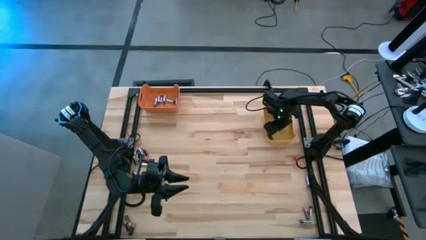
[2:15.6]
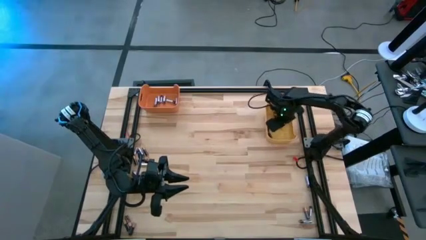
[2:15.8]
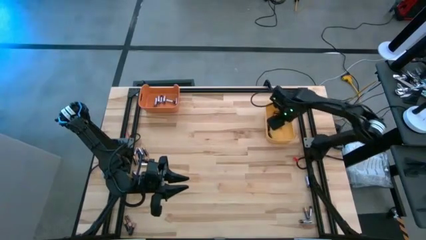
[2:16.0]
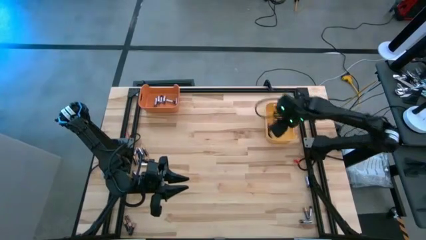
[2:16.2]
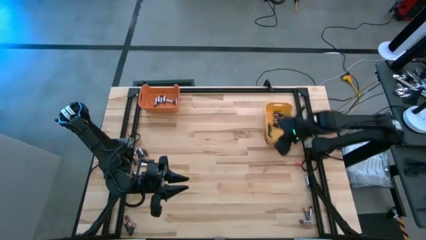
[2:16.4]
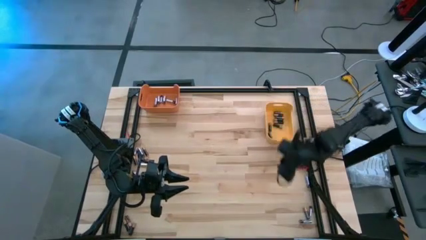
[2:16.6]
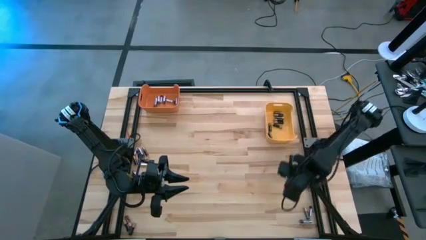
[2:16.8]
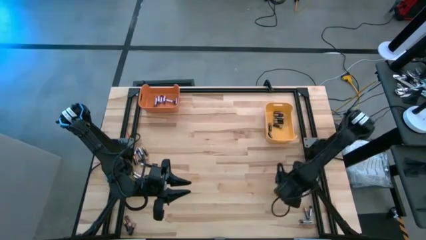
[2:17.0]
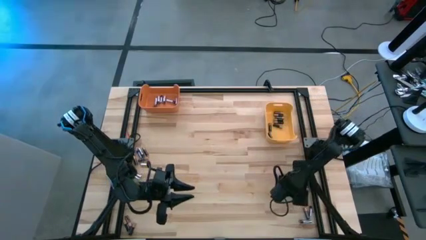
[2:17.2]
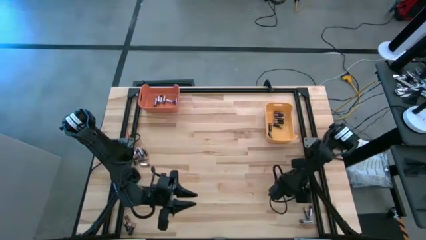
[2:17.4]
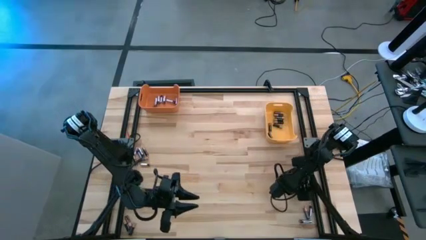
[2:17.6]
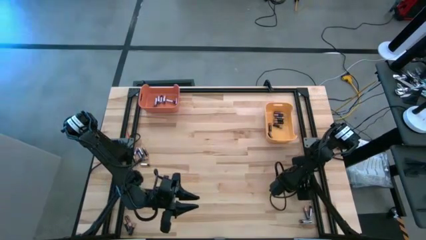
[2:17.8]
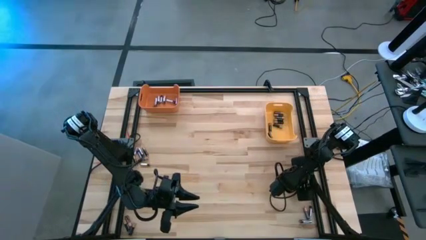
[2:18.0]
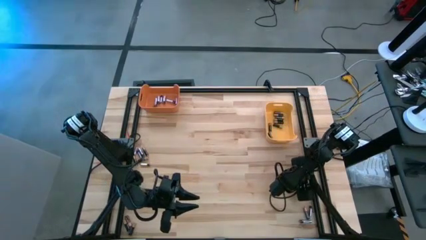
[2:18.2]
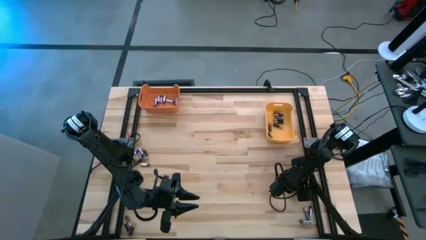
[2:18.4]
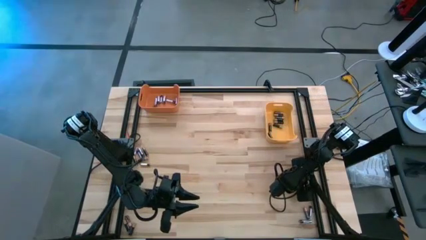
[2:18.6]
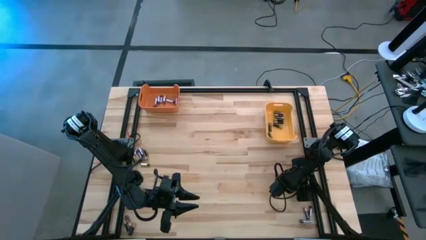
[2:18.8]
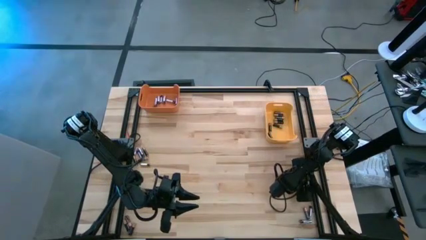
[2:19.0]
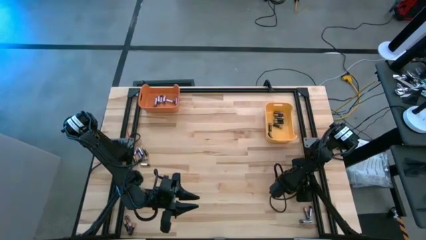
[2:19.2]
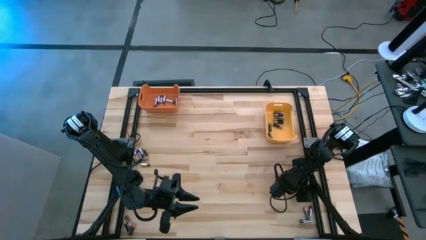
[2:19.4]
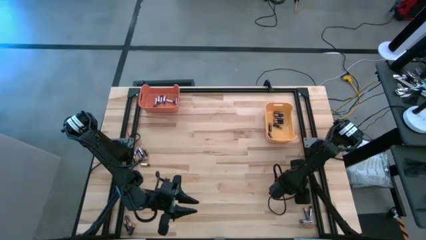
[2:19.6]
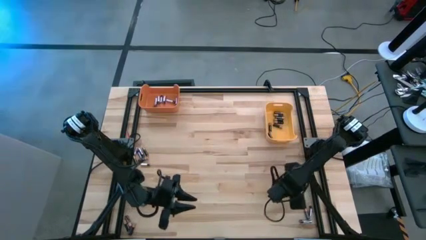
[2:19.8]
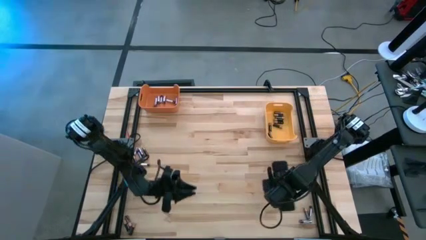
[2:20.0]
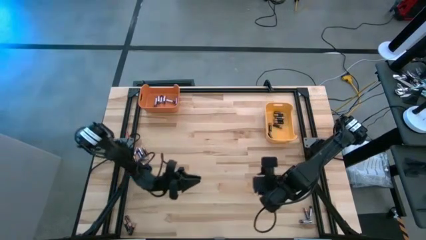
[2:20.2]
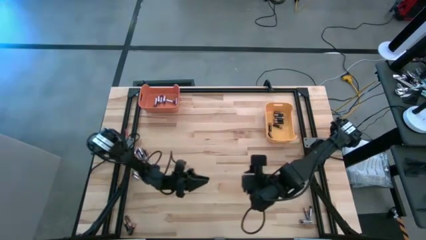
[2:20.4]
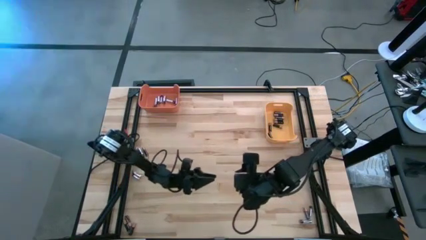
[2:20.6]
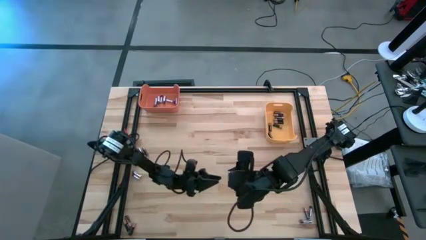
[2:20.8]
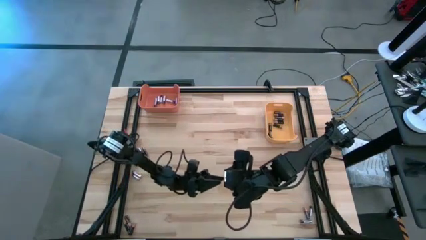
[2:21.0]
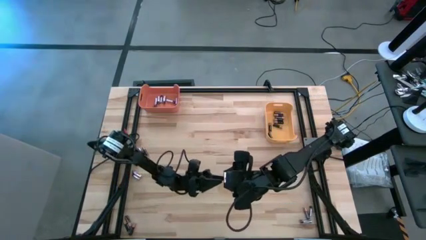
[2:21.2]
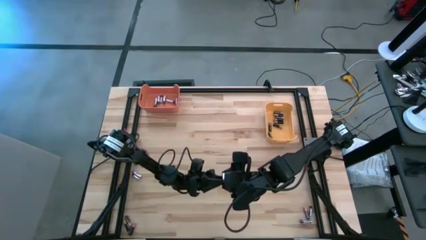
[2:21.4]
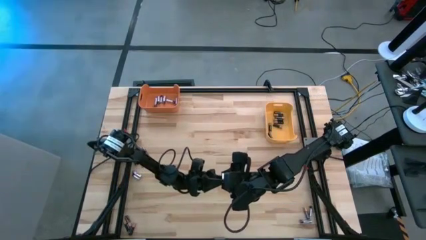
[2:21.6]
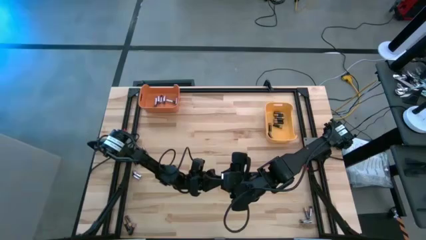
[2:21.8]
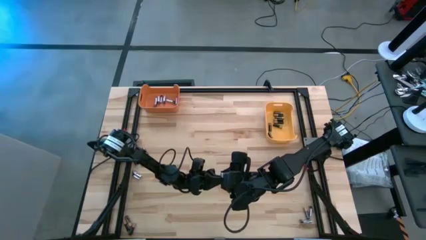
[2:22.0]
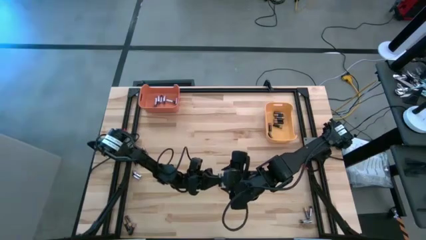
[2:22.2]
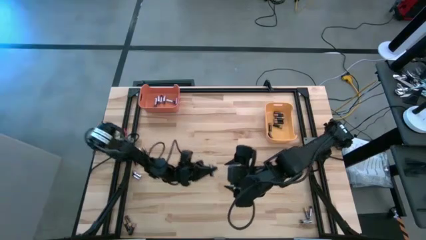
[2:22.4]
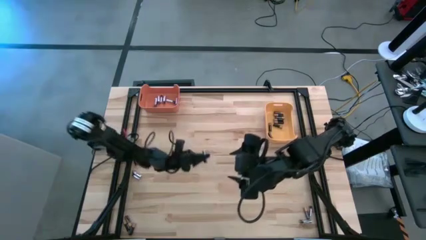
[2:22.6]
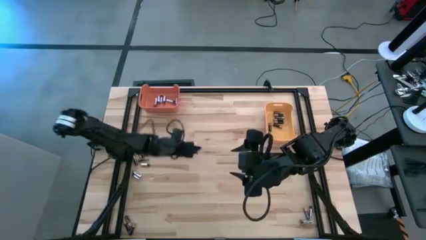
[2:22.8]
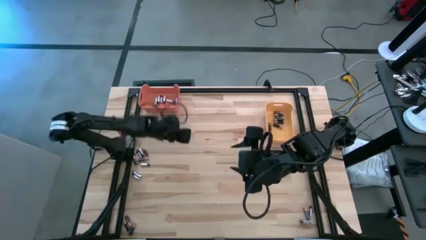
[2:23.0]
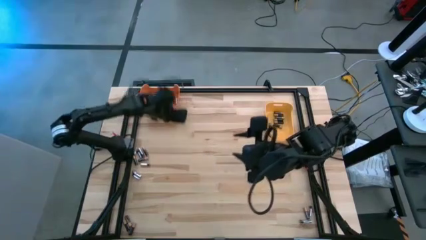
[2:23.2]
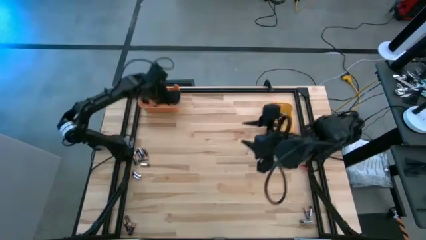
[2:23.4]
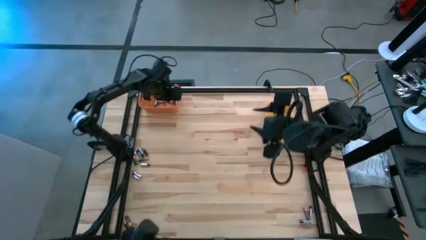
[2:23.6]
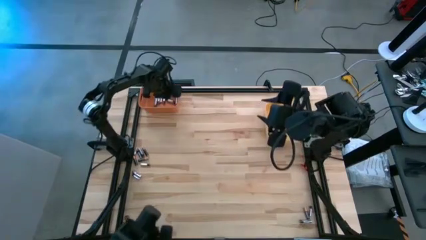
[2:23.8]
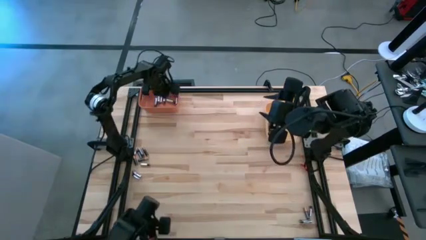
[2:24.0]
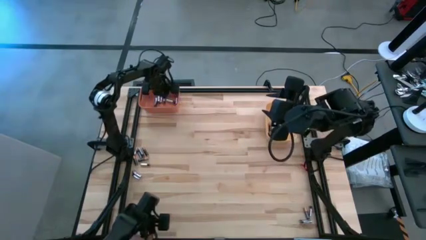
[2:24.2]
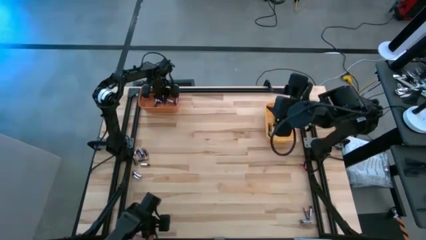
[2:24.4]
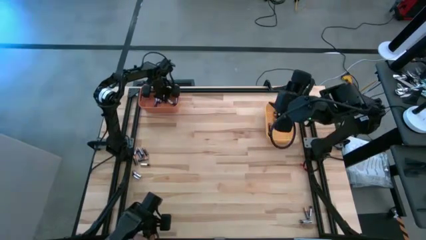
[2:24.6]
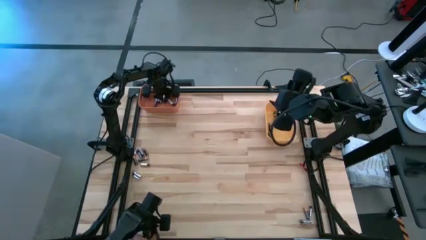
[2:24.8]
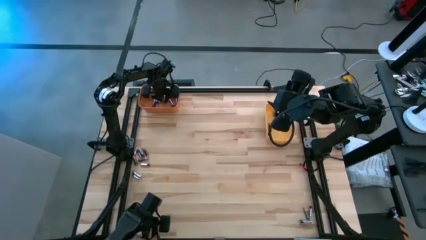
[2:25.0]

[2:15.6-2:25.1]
Task: Sort batteries
Put the silver battery into the orange bin

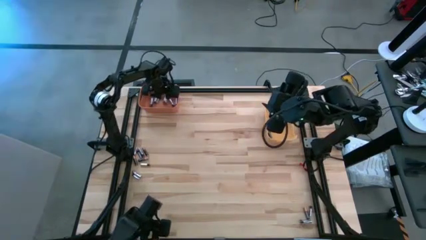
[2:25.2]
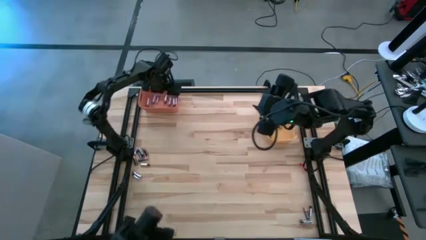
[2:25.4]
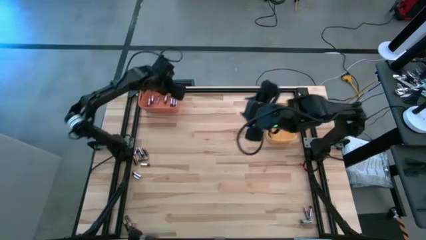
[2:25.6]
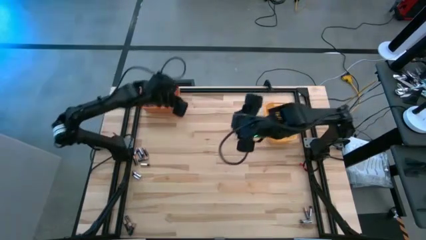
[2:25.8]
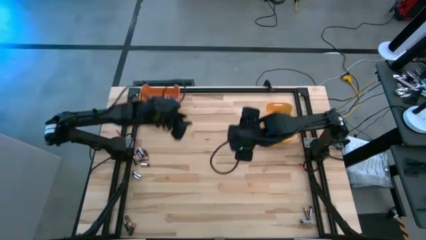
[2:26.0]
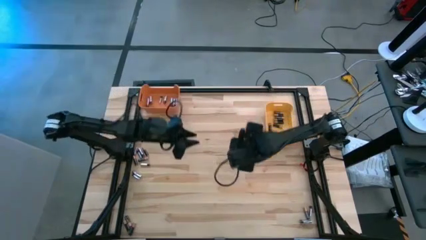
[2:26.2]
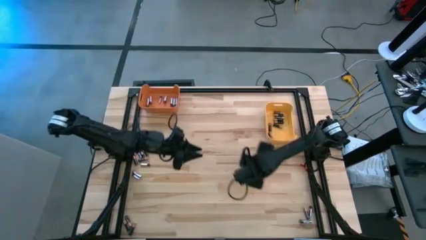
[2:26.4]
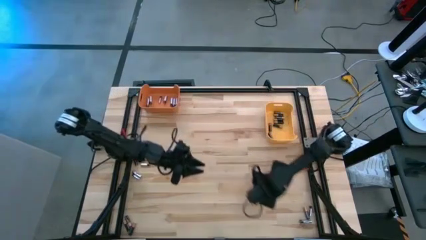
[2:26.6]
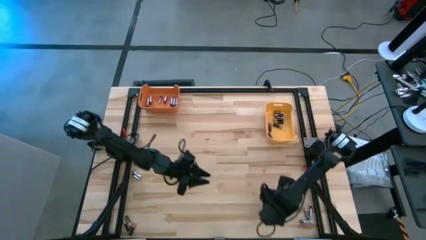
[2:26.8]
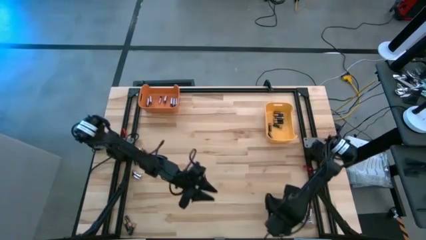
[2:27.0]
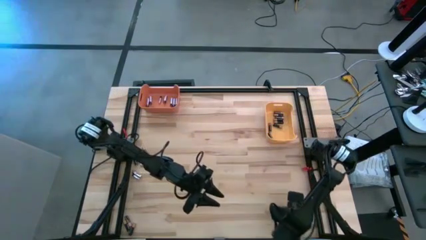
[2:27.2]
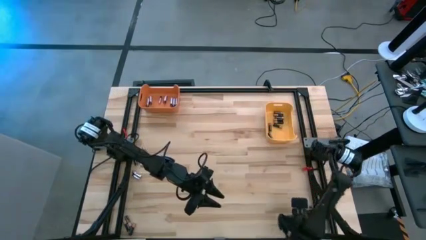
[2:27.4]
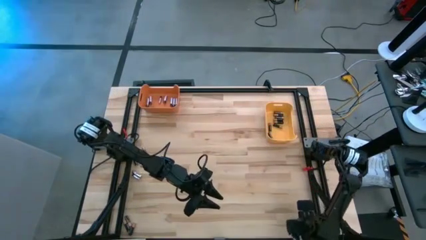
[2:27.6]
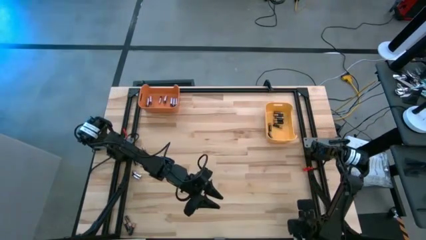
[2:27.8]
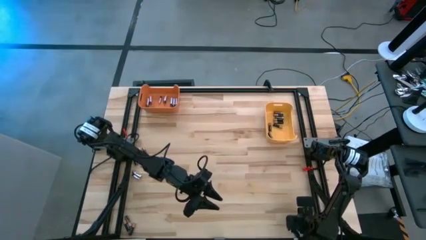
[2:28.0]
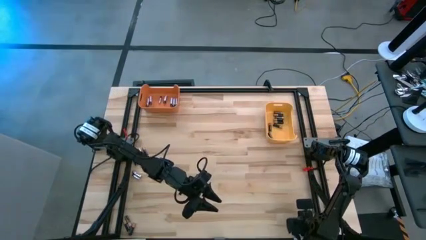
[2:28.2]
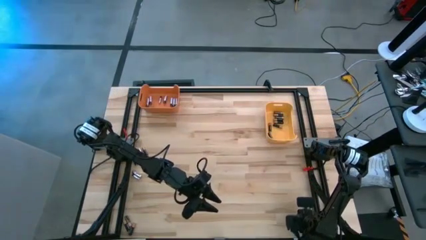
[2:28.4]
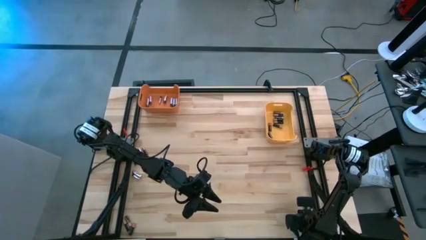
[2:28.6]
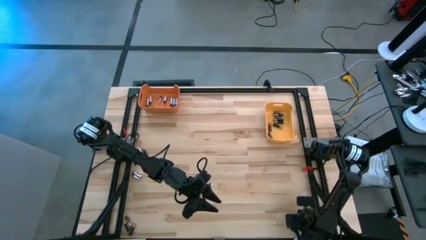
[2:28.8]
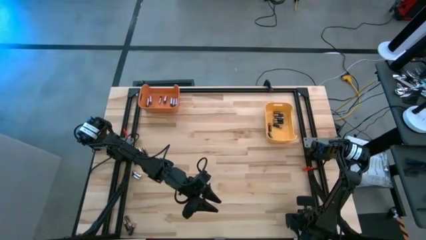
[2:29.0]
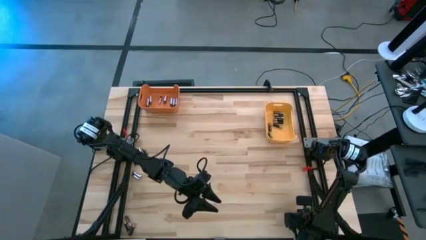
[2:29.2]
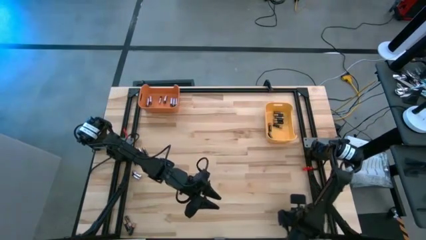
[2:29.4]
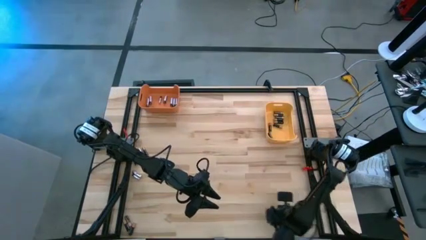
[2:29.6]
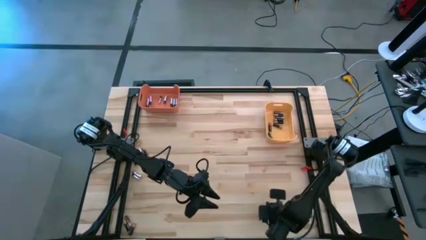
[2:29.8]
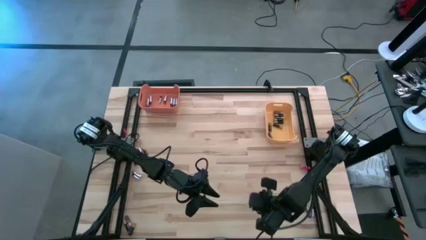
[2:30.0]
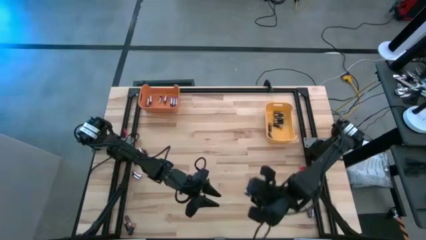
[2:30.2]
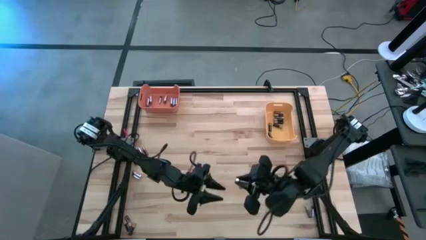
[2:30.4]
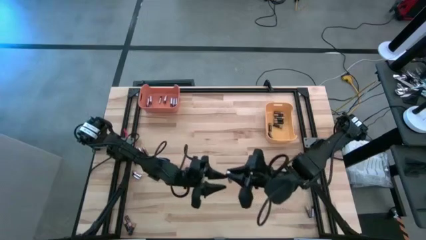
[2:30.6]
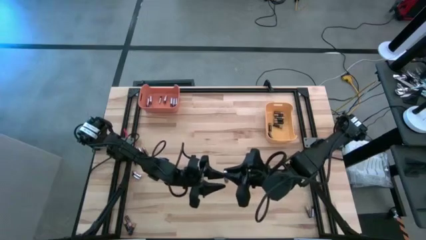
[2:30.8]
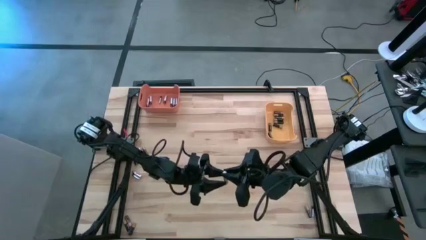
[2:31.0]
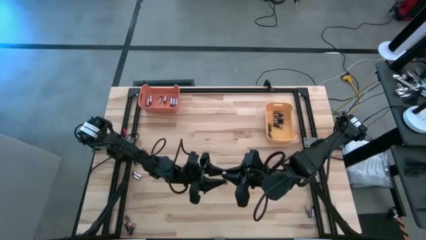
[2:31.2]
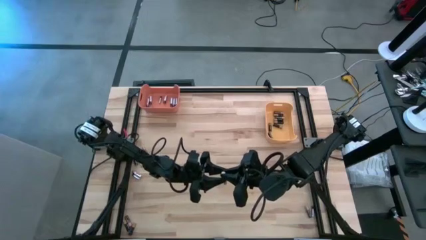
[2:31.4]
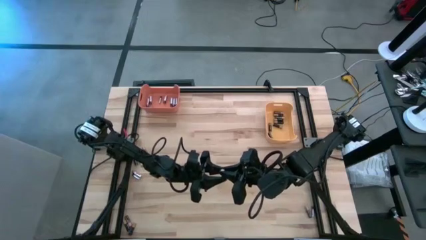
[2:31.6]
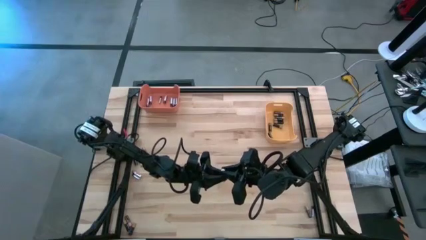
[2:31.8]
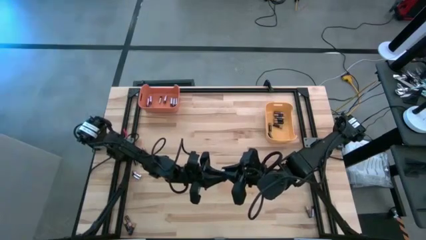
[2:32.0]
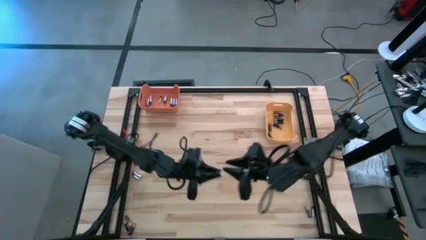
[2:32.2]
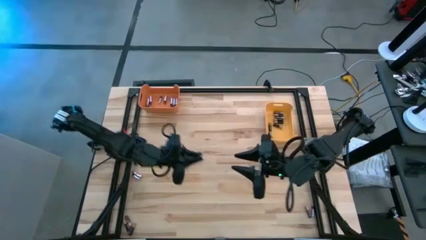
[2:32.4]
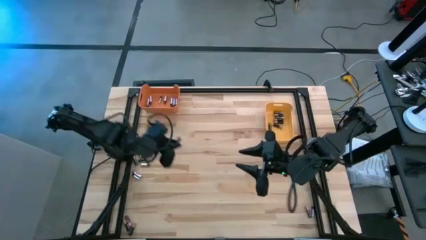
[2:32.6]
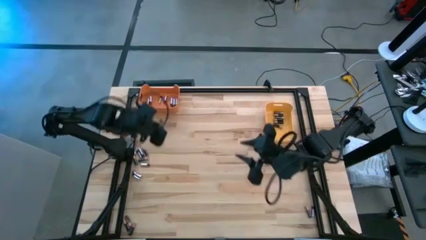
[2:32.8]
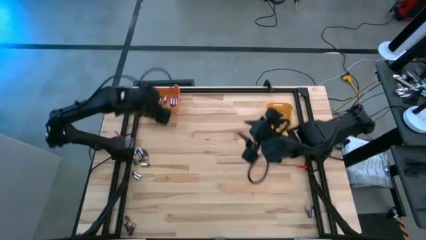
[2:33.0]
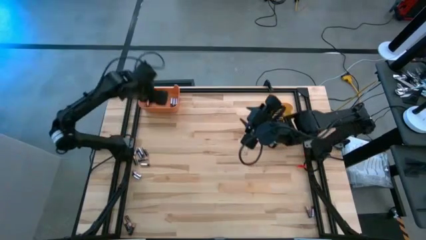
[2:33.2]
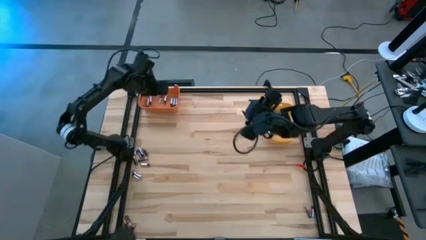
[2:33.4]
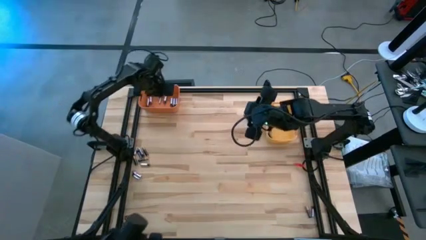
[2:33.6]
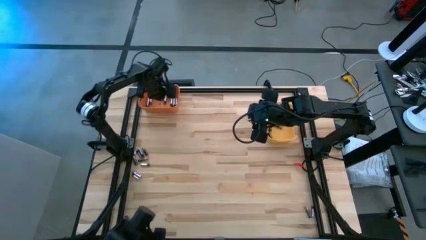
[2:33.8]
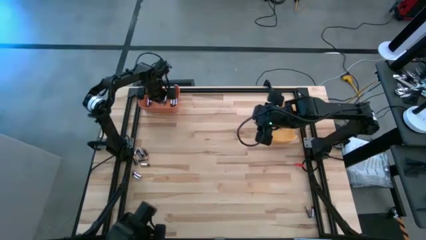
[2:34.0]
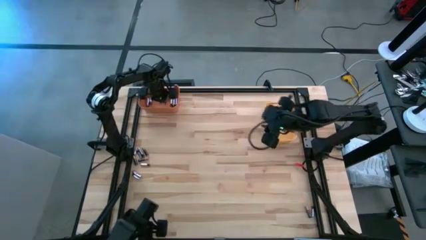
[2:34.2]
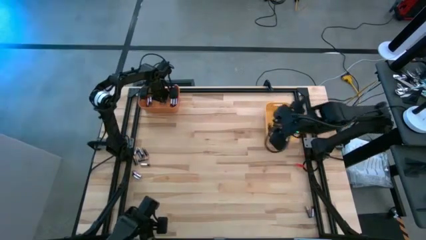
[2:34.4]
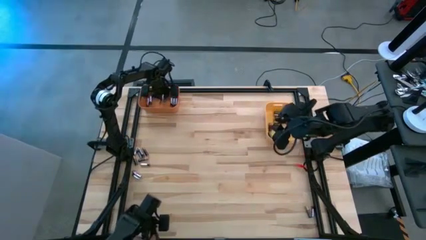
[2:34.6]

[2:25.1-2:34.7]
Put the silver battery into the orange bin
